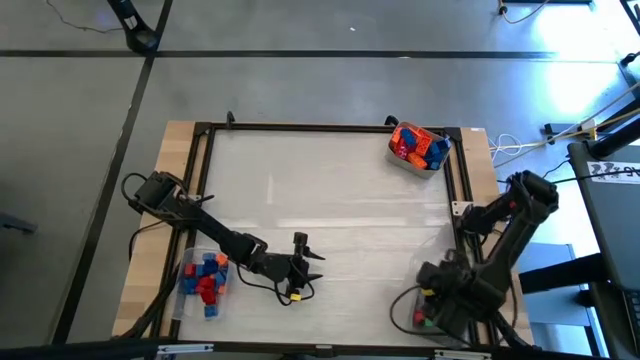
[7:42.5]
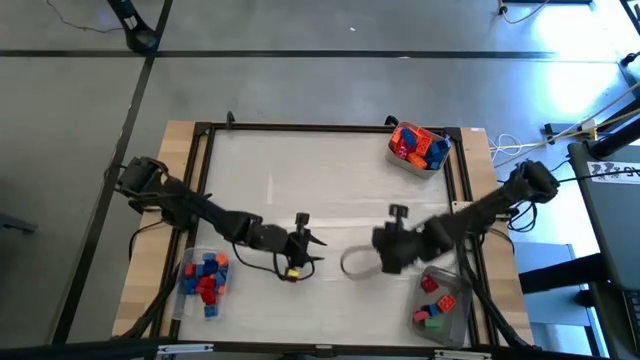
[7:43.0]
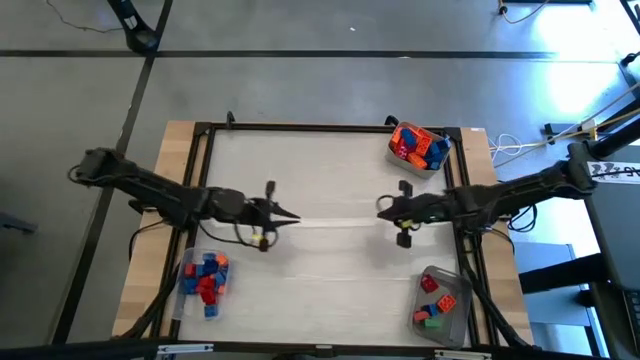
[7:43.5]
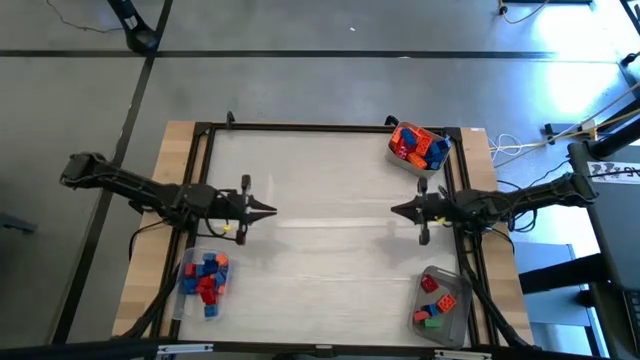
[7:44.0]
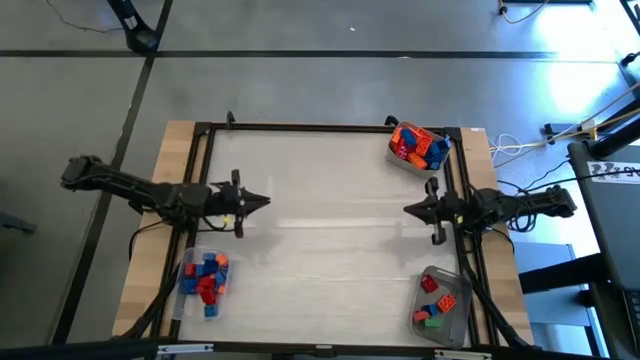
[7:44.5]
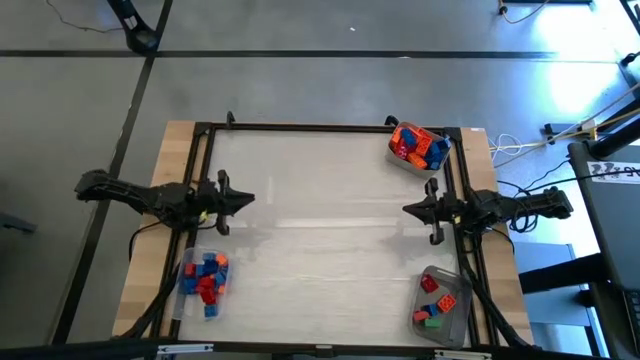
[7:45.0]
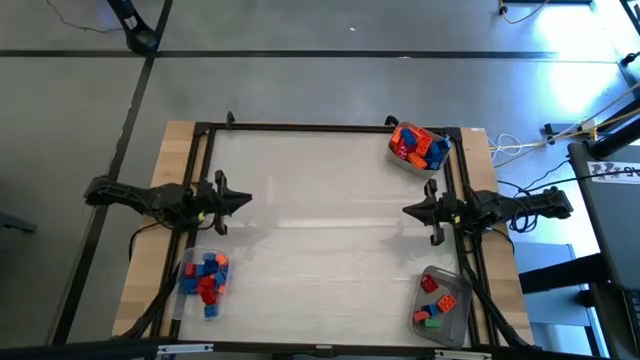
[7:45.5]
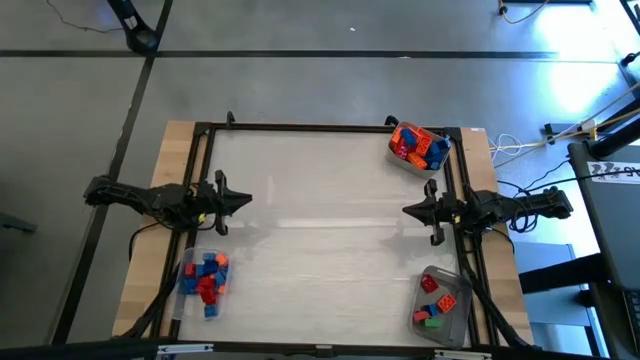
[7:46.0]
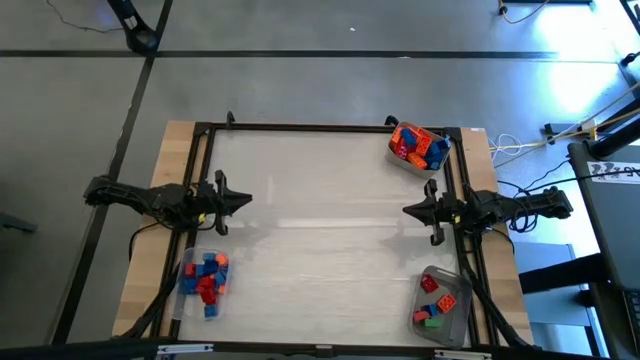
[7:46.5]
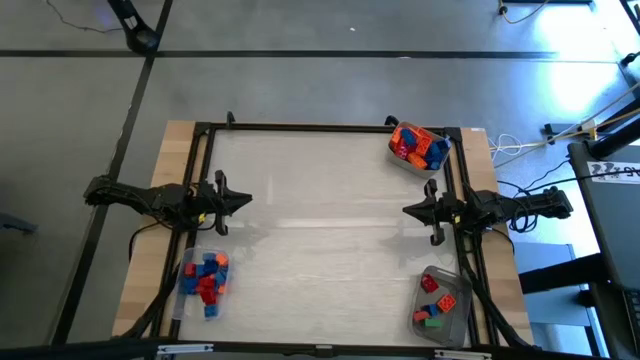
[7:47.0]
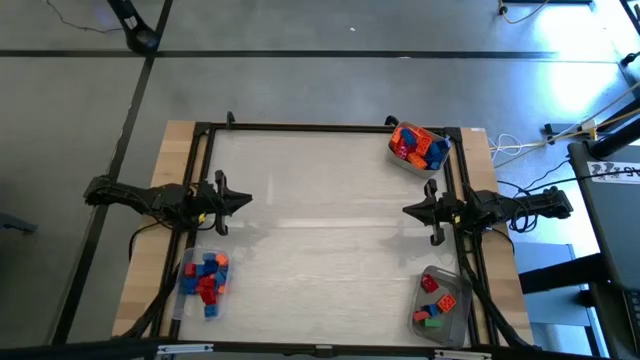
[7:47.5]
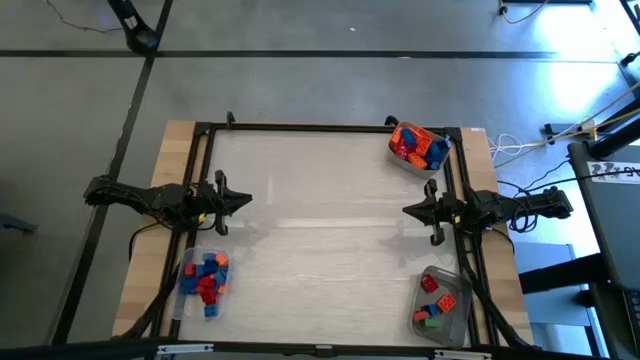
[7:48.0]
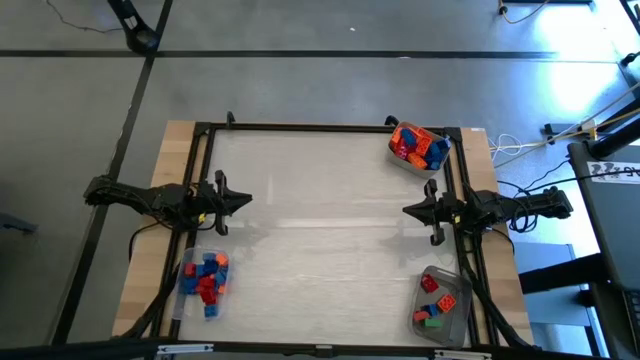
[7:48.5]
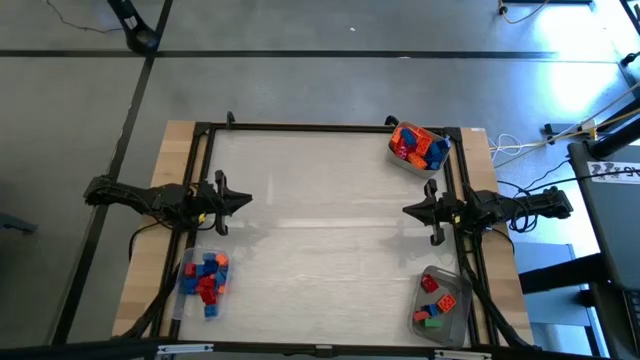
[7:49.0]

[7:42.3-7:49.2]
Task: Sort blocks by size
Return to Home Position

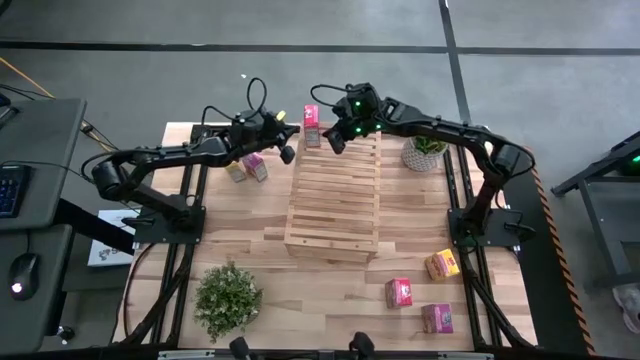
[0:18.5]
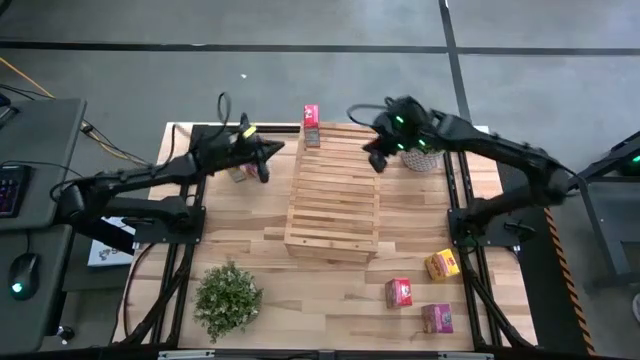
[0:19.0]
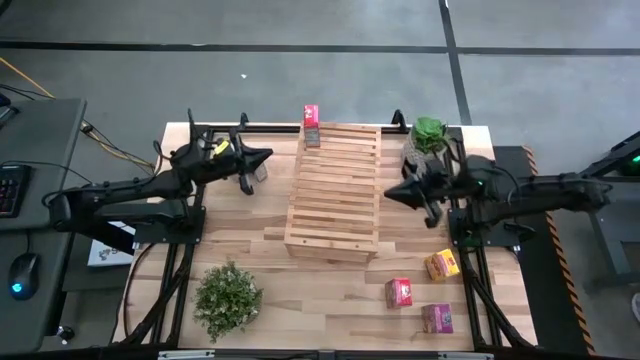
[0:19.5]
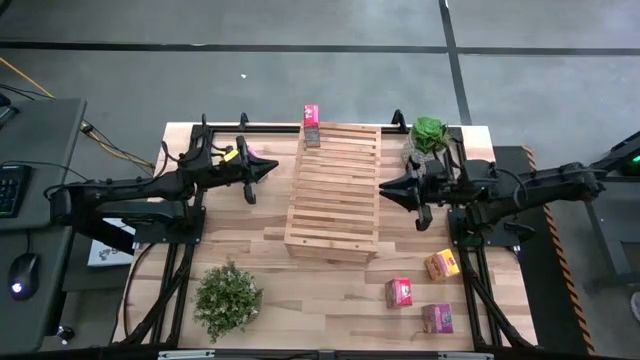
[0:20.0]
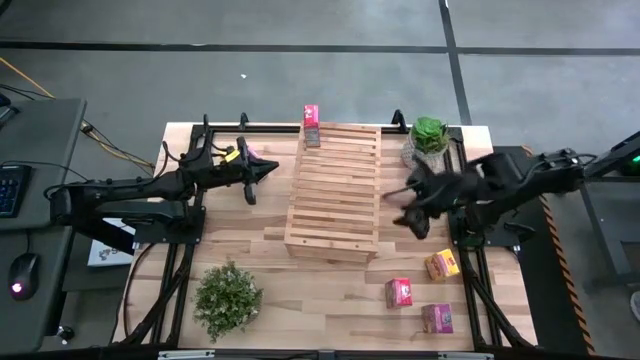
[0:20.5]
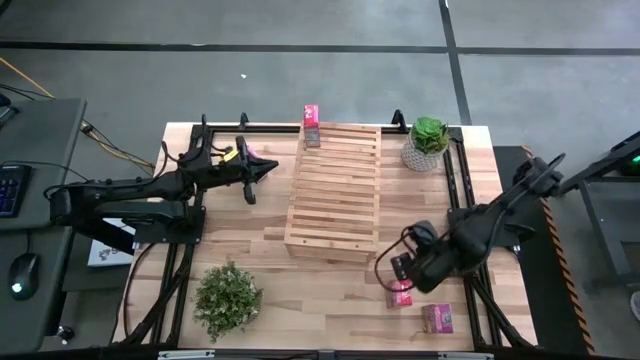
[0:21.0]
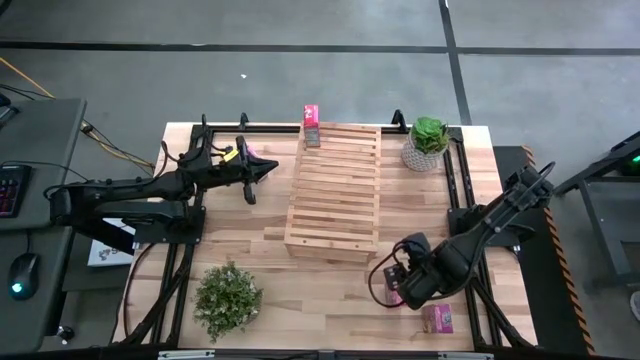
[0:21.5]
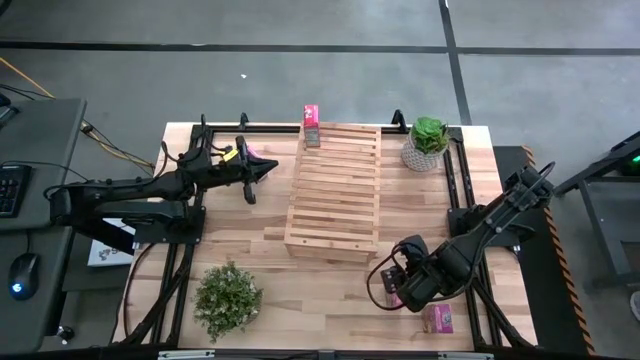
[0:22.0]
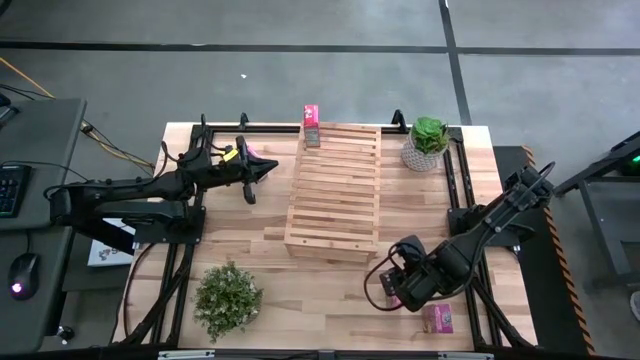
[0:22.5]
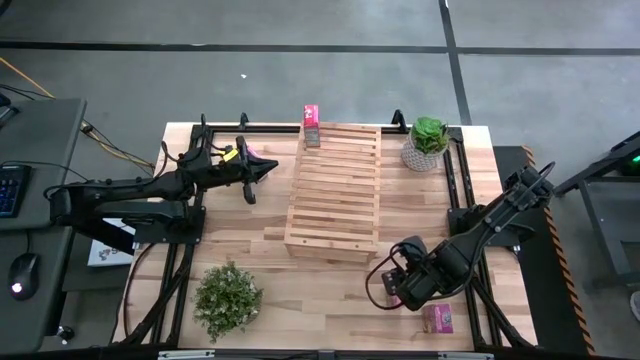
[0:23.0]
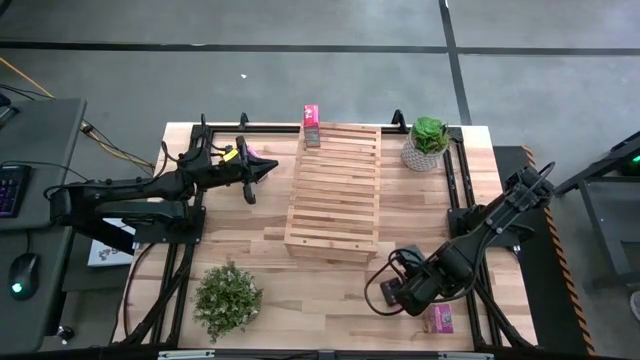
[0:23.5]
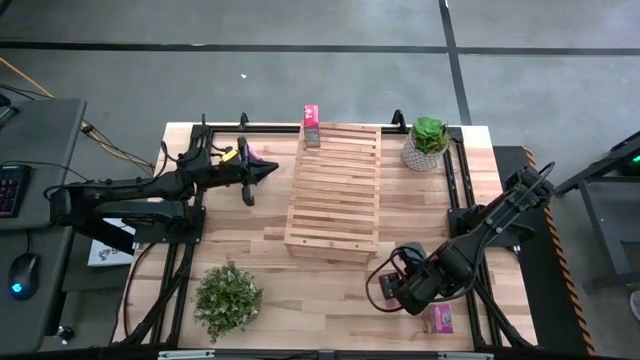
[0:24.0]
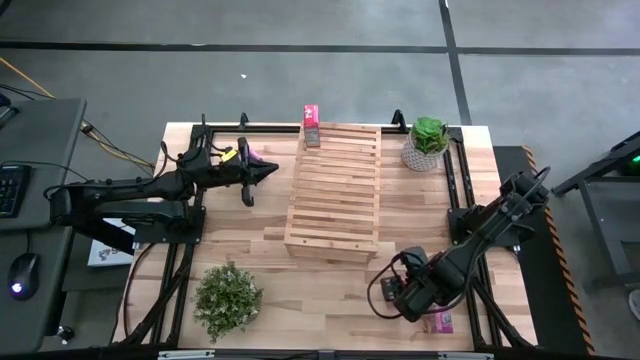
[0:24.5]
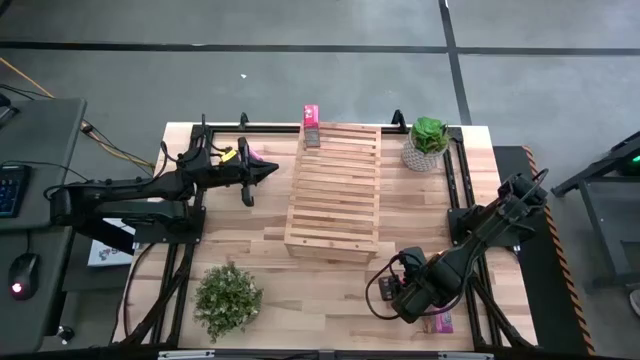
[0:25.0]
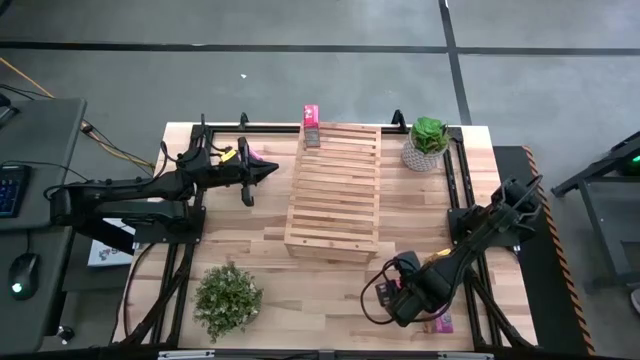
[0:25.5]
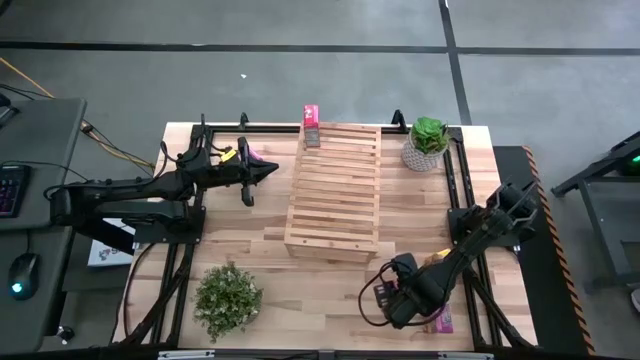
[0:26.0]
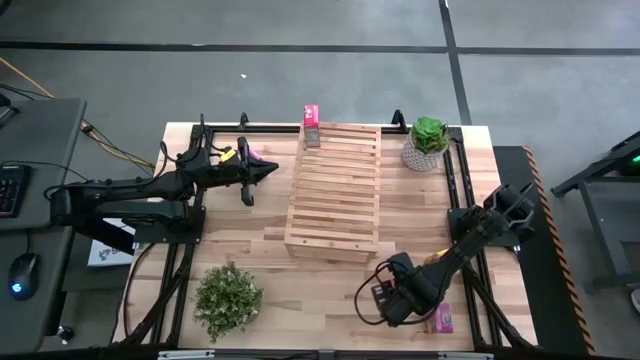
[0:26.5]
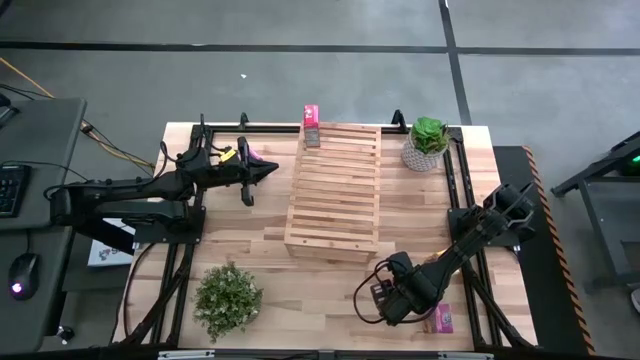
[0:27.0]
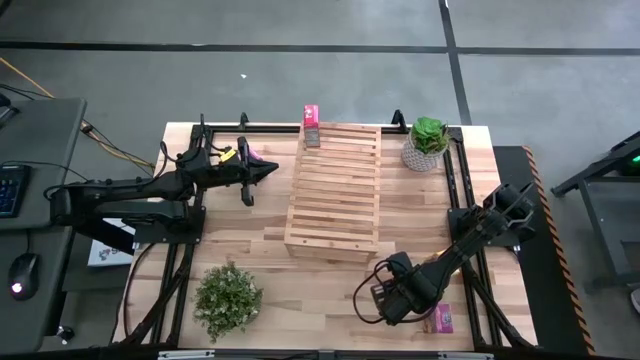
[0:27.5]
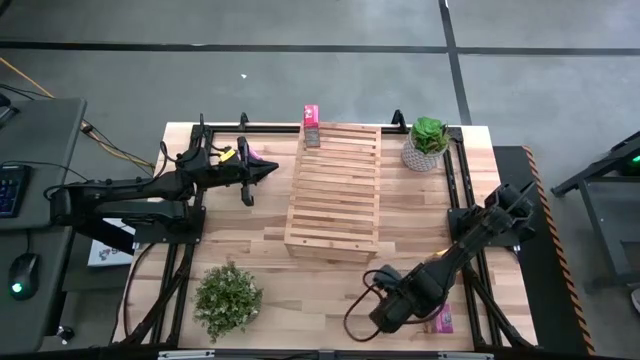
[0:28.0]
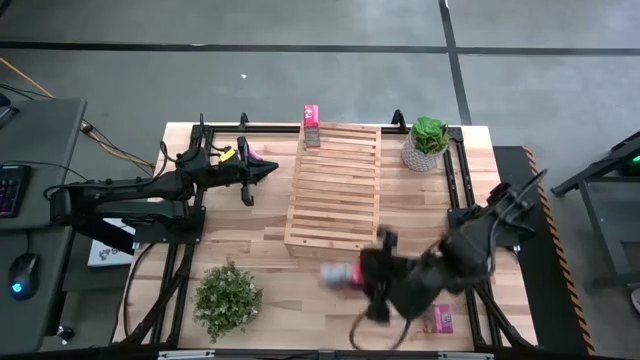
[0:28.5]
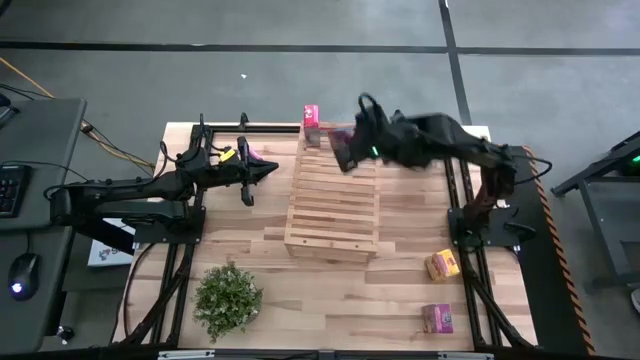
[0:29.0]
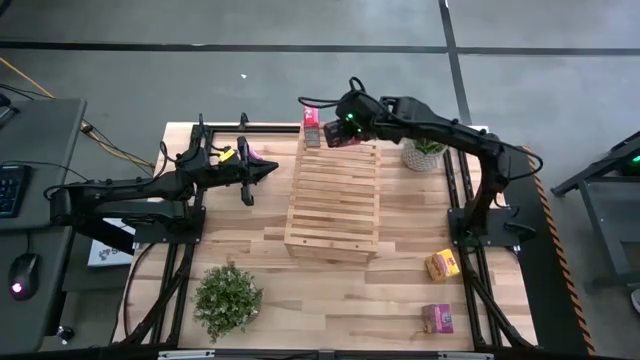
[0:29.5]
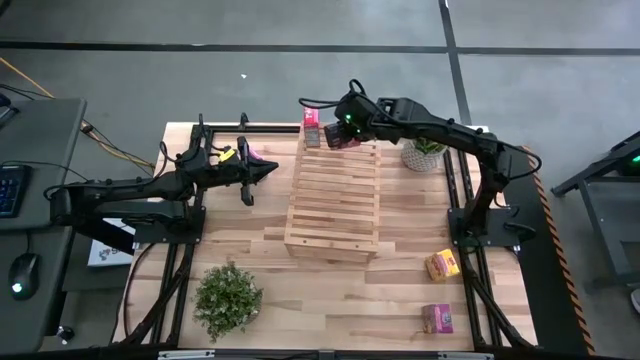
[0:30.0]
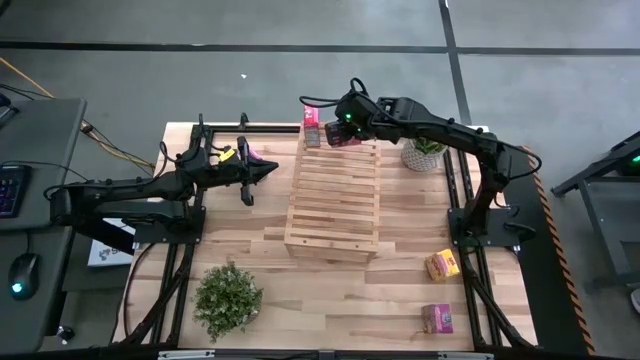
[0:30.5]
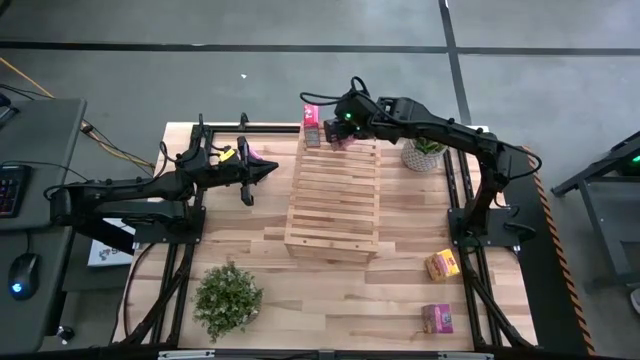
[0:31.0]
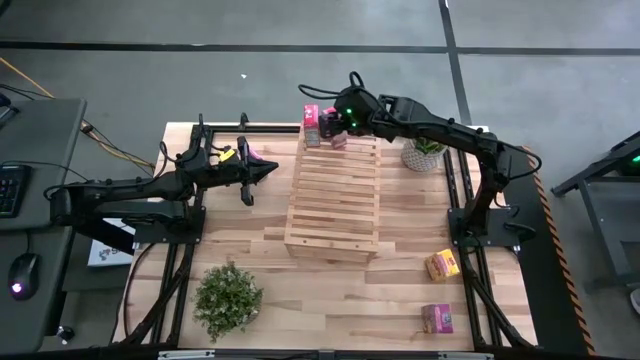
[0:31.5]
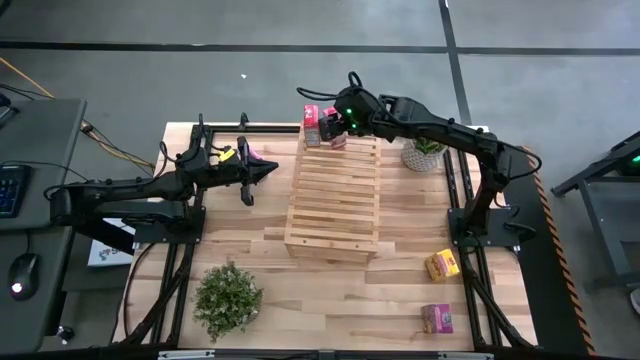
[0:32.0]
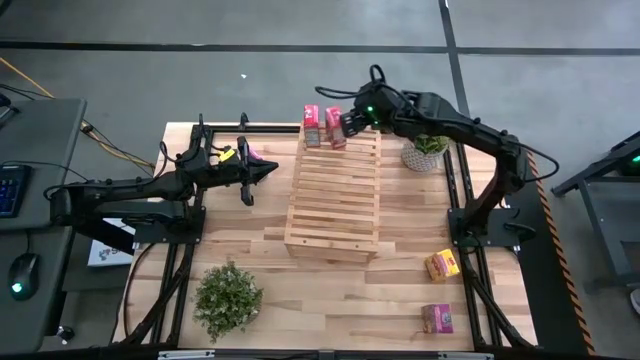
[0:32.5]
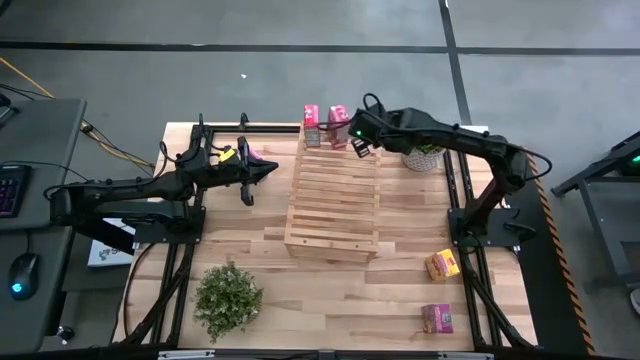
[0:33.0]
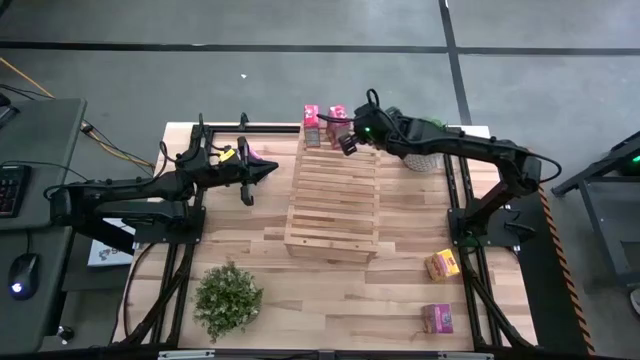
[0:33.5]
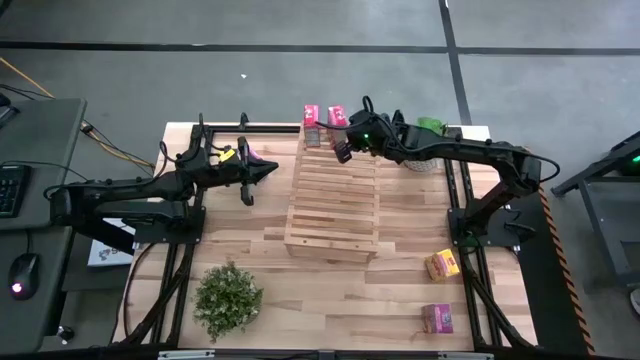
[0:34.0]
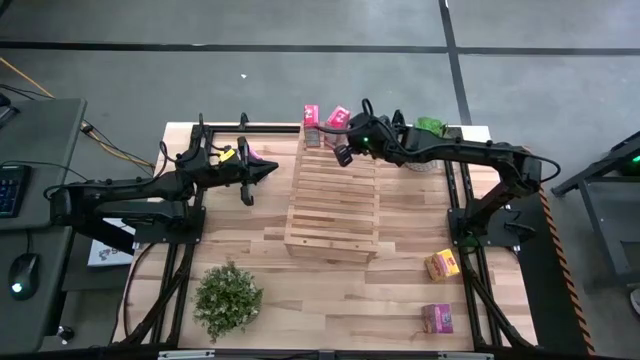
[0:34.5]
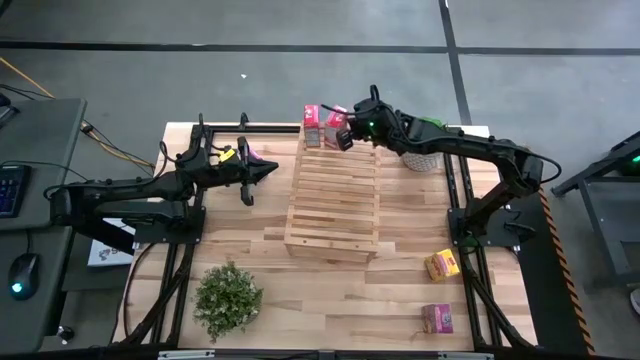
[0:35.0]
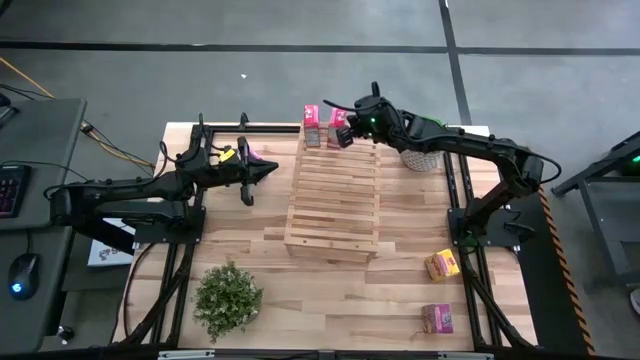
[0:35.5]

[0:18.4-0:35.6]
Task: Stack cereal on shelf
Put the red cereal box on the shelf aligned with the red cereal box
